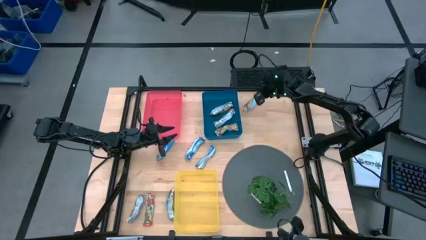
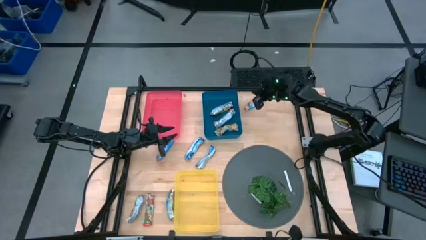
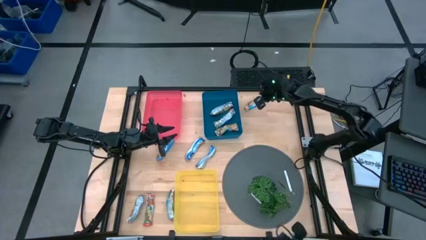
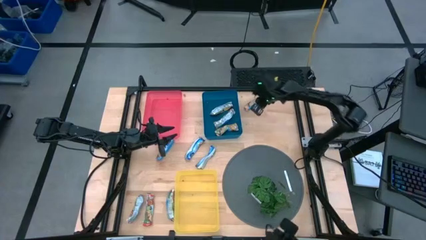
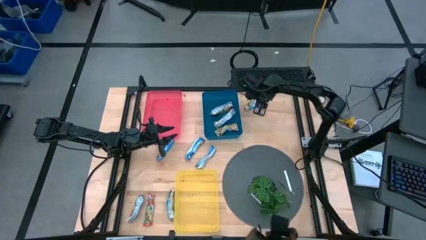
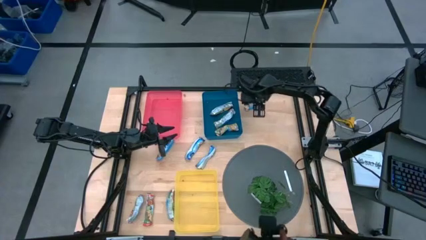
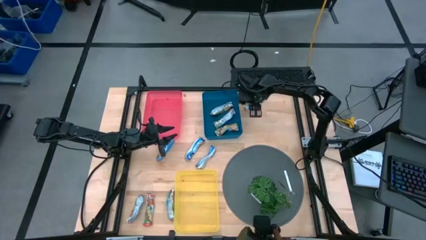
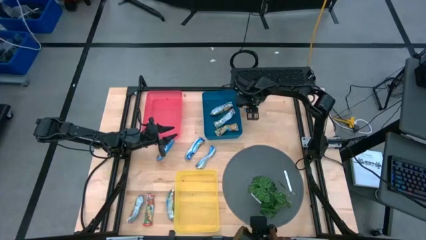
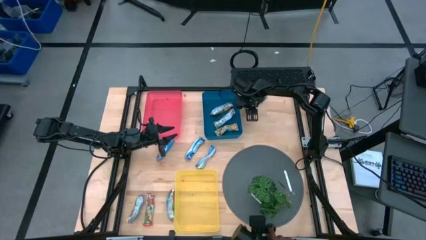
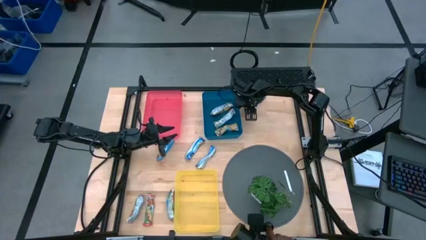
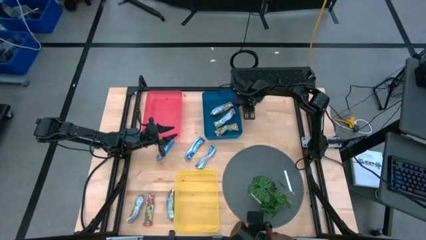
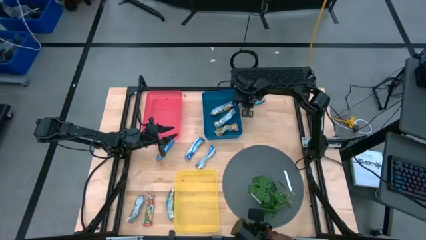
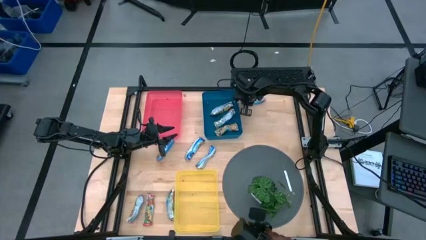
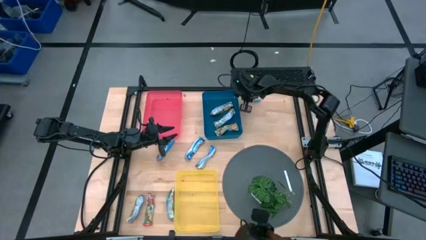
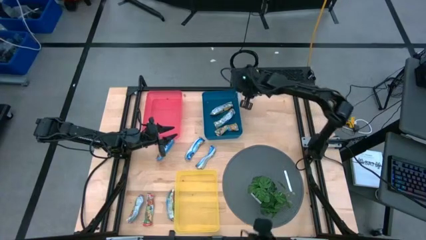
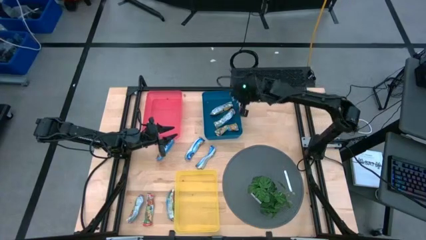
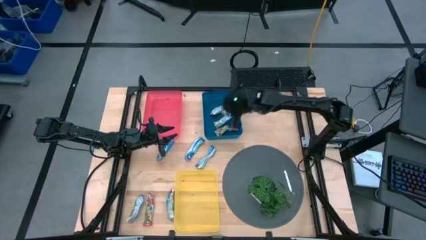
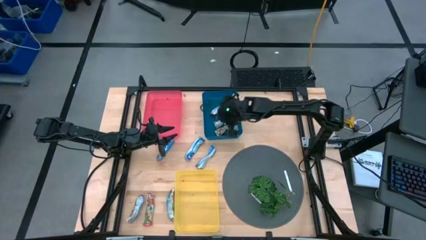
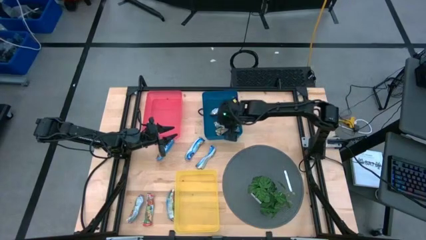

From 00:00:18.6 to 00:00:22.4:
Task: Pick and place Granola Bars by type
Put the yellow granola bar into the blue bin

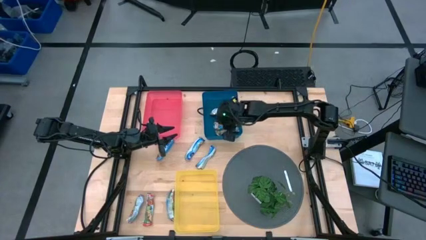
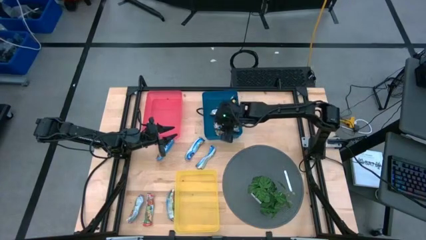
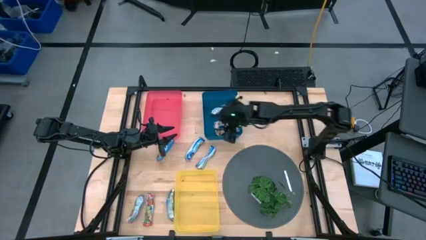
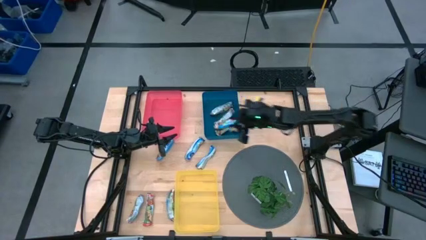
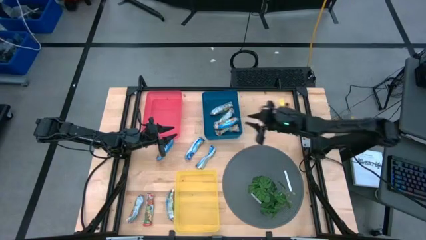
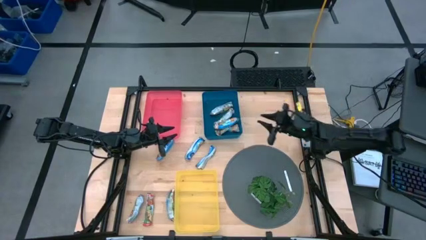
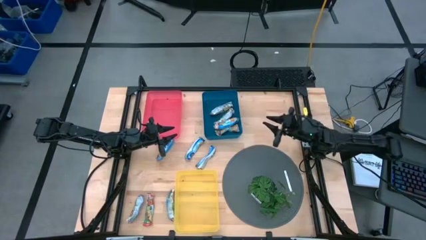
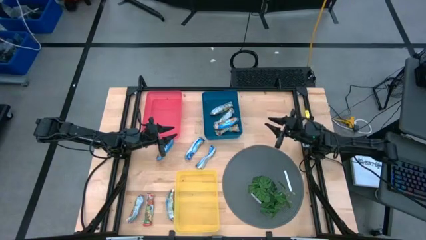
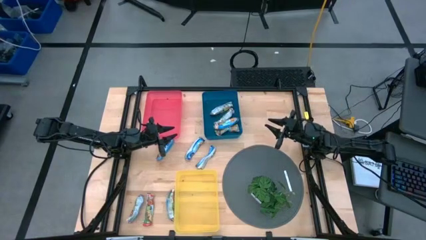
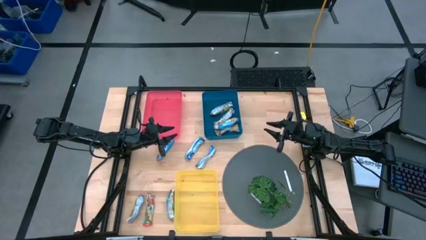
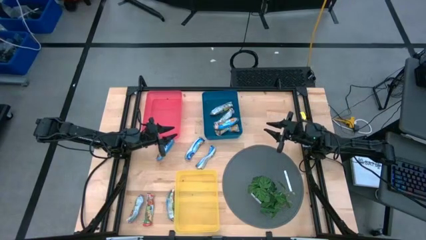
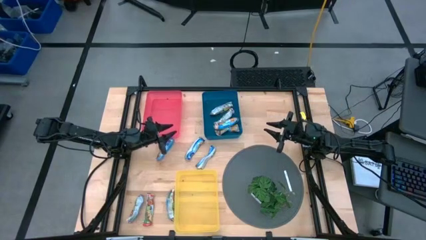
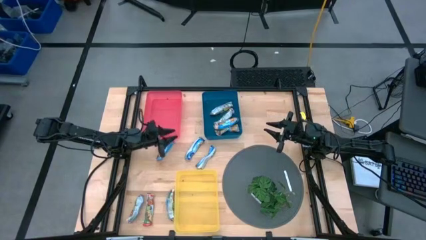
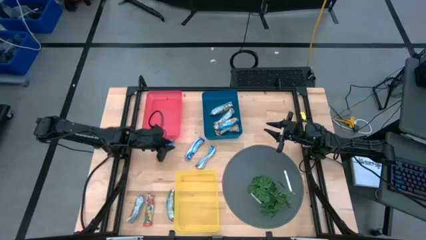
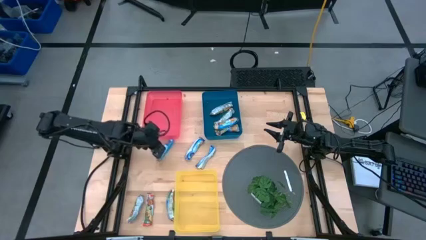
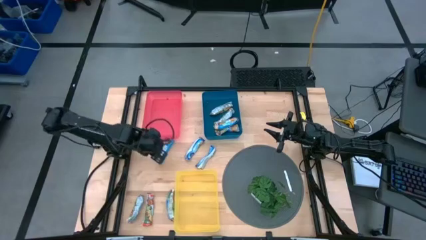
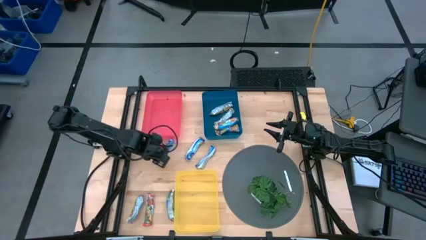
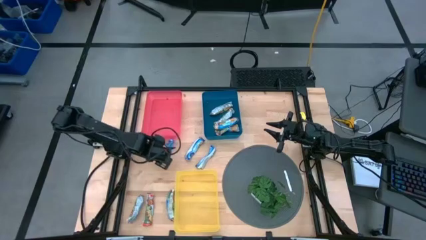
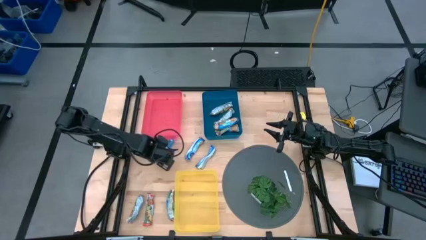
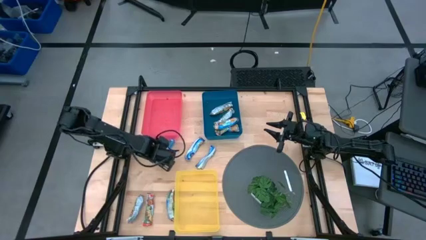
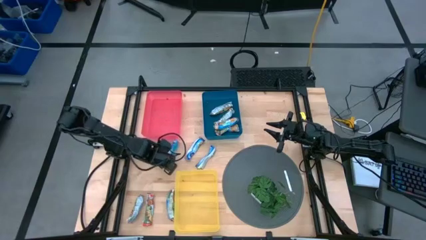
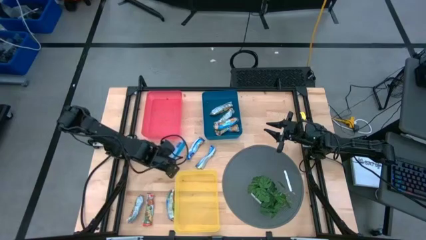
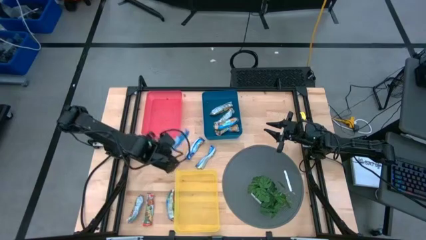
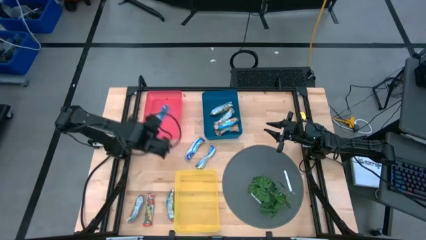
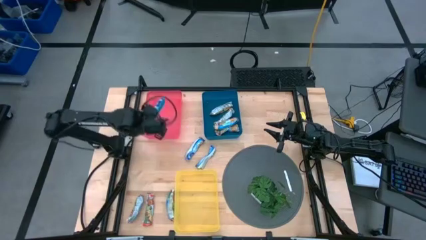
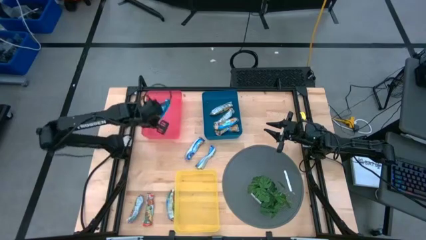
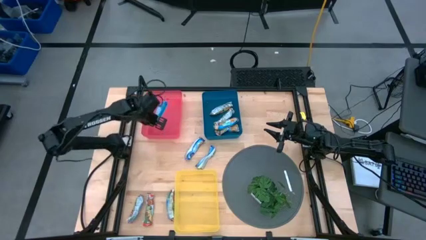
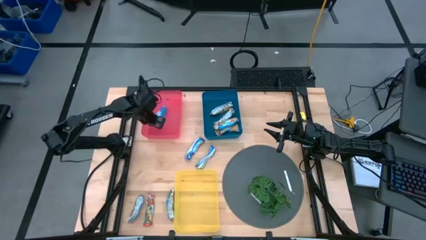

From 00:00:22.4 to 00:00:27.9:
Put the left blue granola bar into the red bin

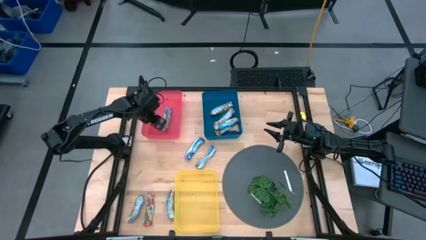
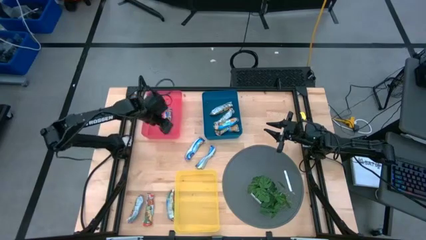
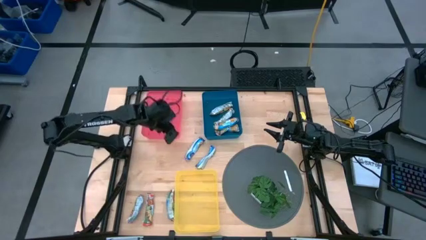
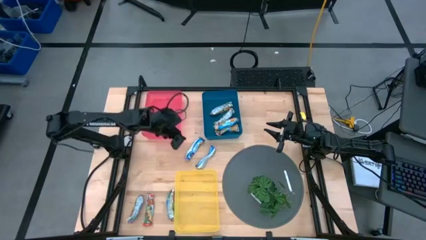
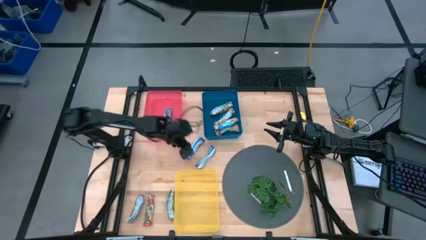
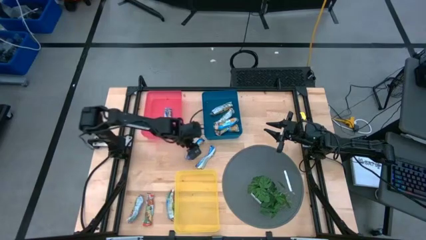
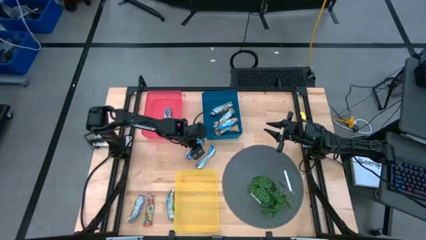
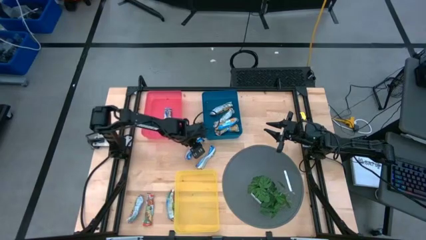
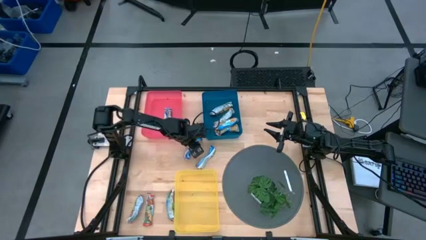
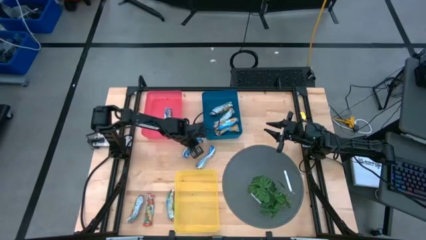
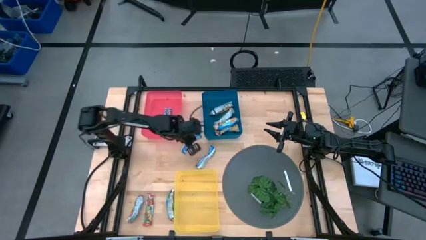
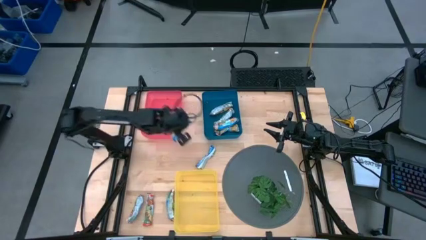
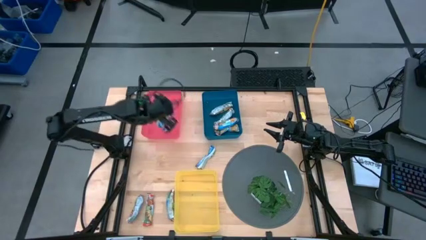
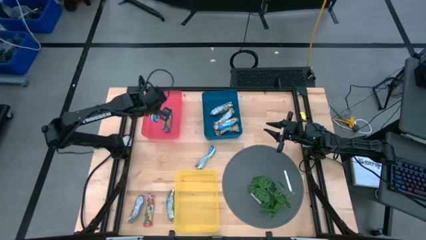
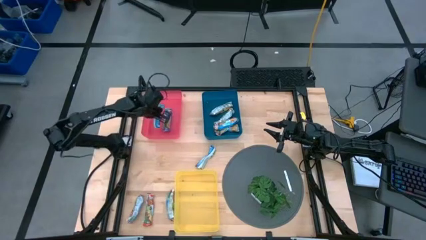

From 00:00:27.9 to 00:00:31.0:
Put the left blue granola bar into the red bin

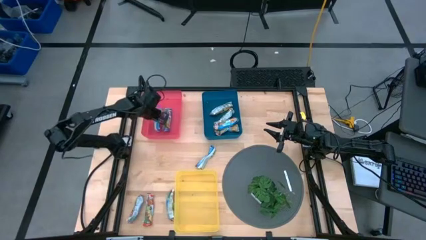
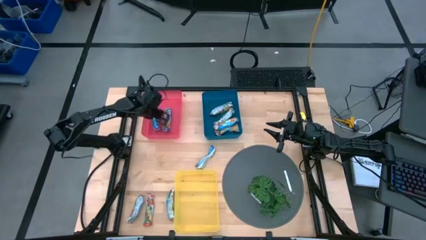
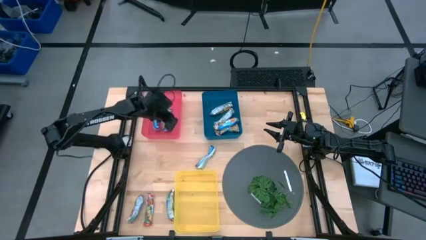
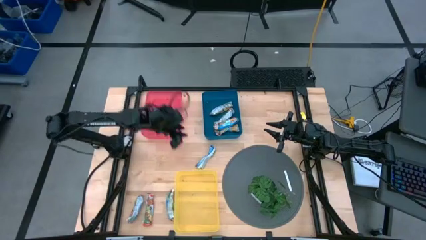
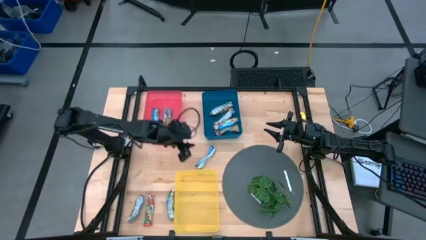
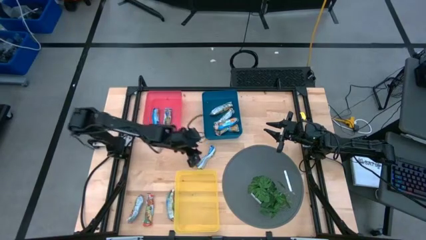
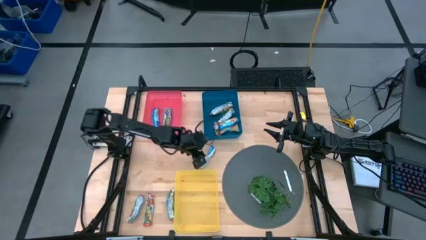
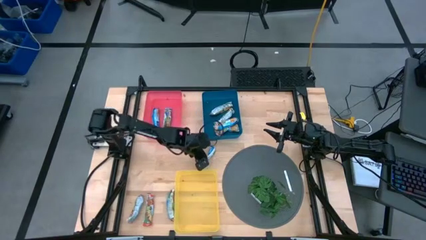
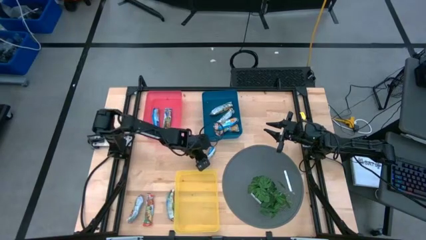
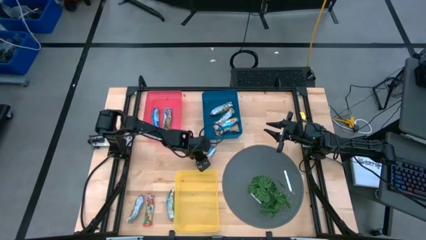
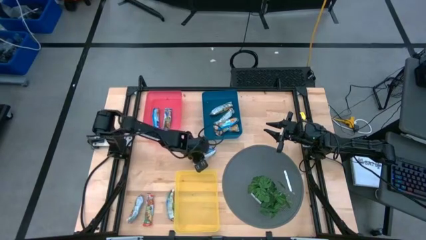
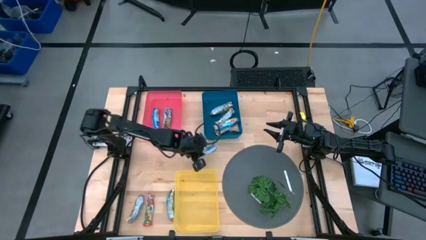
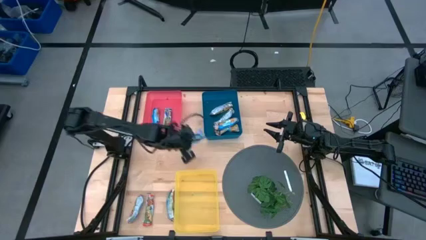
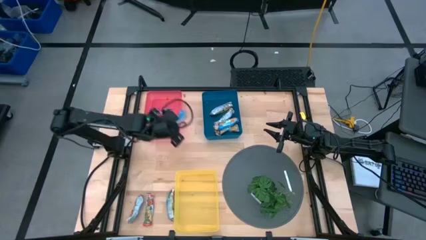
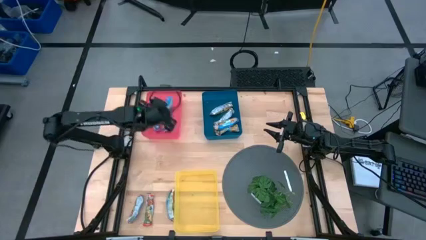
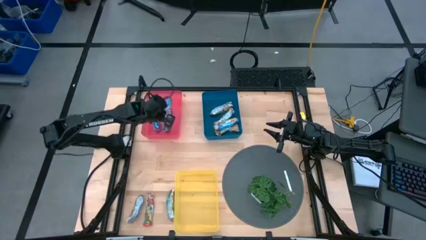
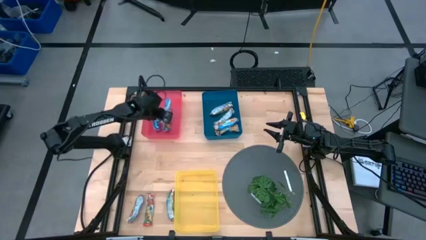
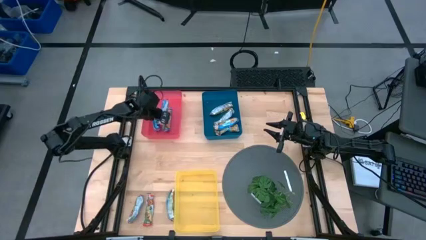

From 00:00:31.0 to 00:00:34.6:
Put the blue granola bar into the red bin
